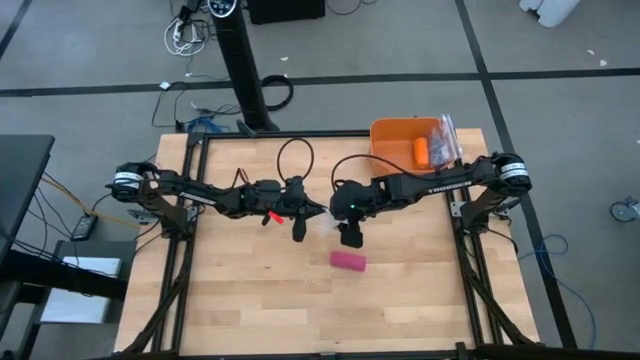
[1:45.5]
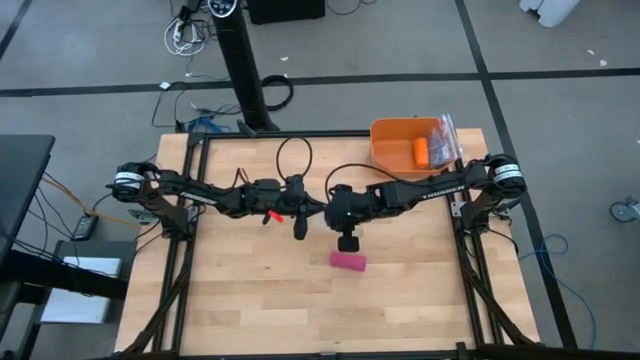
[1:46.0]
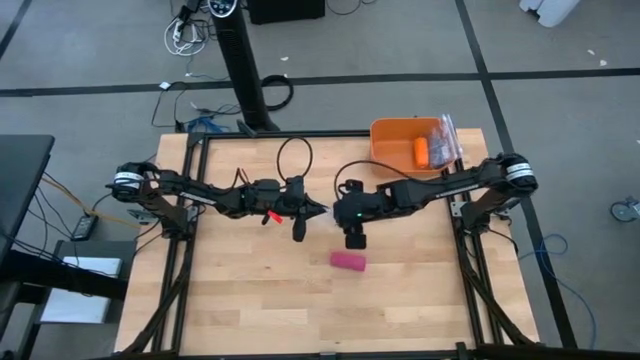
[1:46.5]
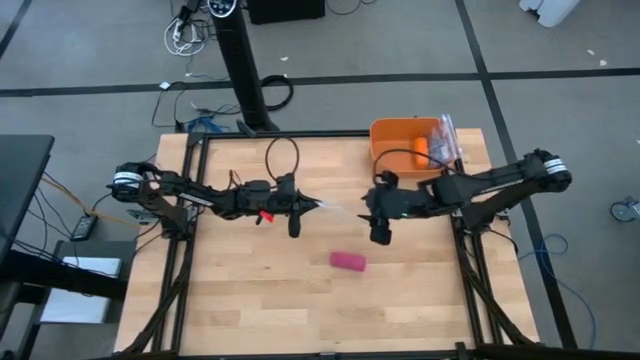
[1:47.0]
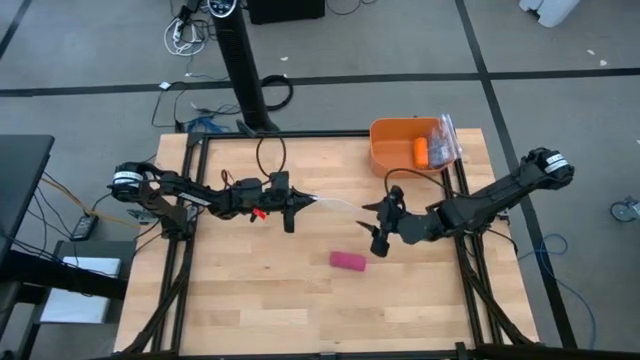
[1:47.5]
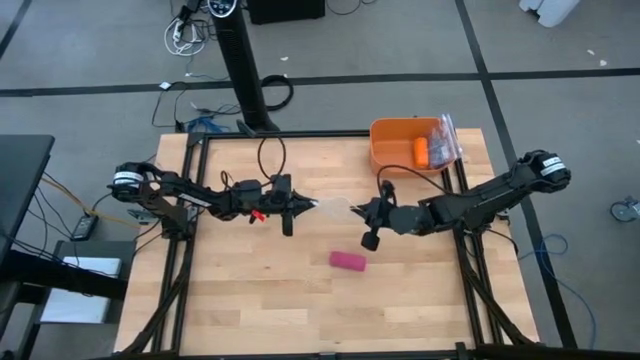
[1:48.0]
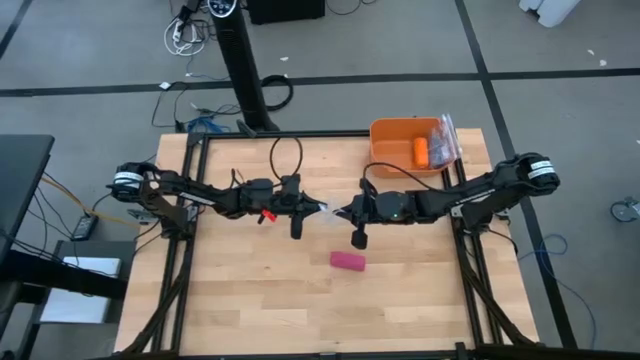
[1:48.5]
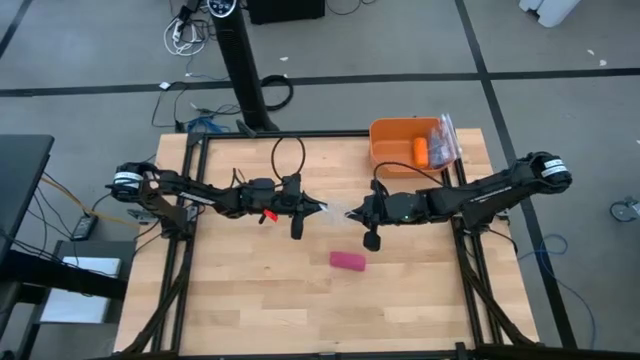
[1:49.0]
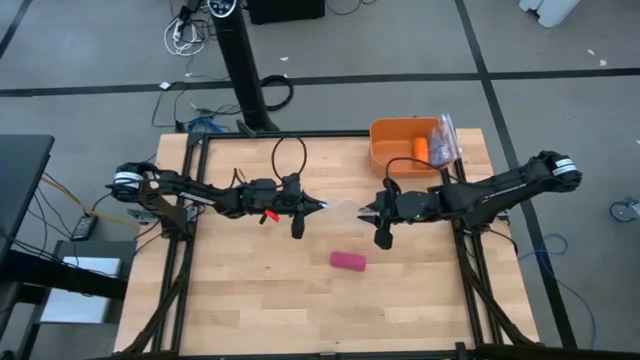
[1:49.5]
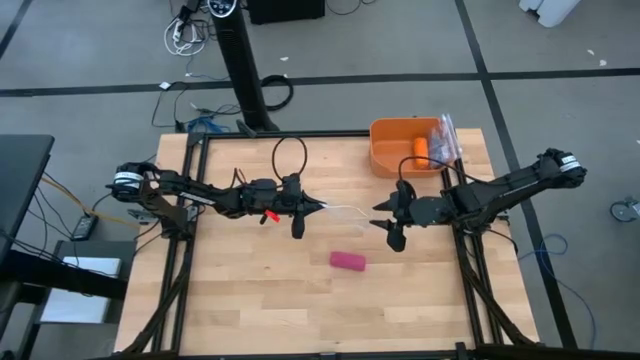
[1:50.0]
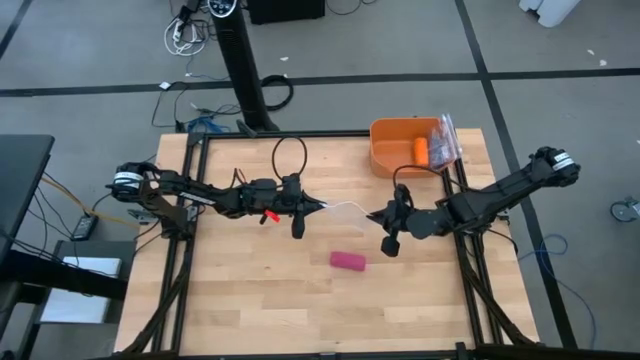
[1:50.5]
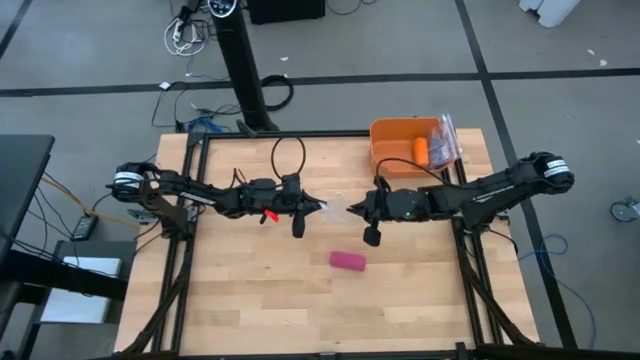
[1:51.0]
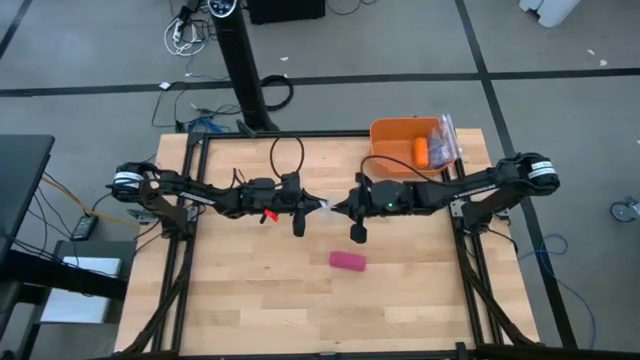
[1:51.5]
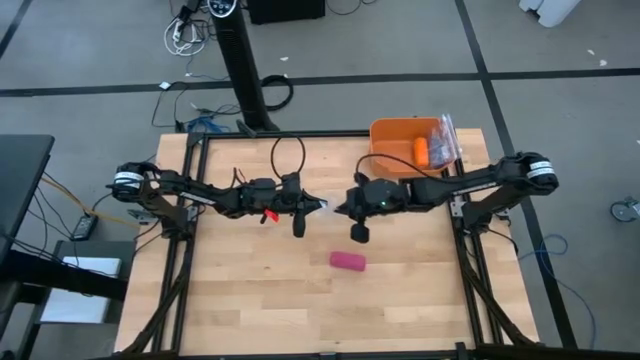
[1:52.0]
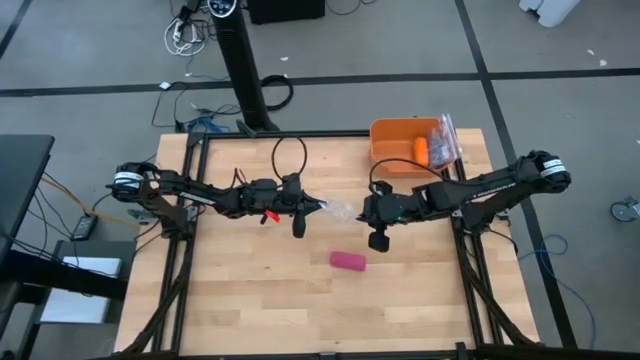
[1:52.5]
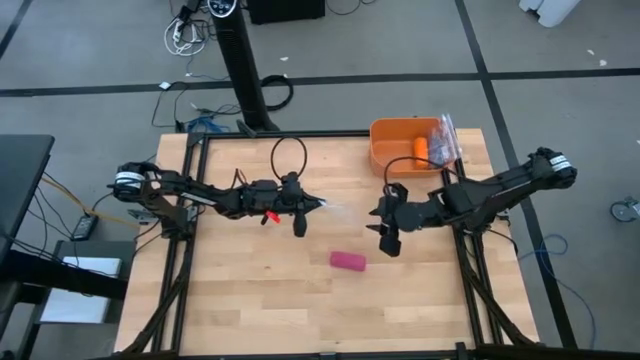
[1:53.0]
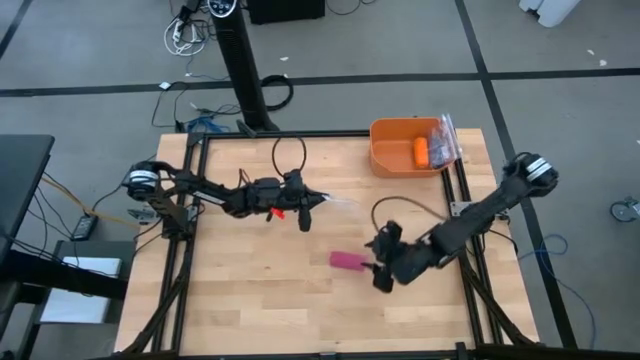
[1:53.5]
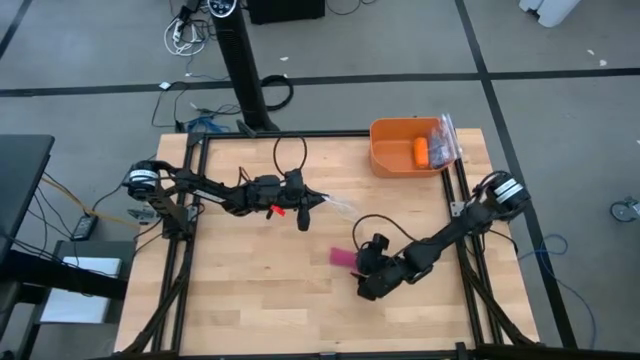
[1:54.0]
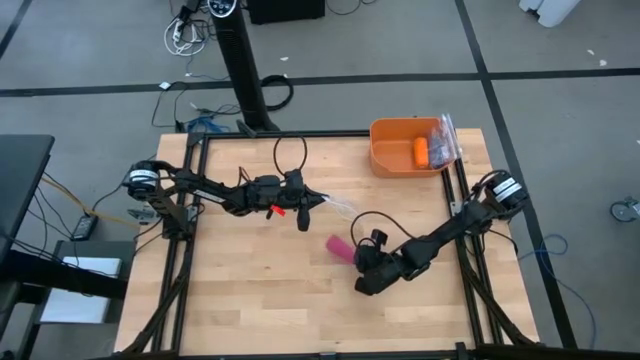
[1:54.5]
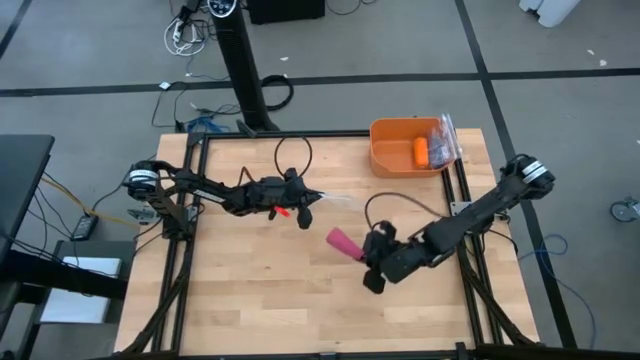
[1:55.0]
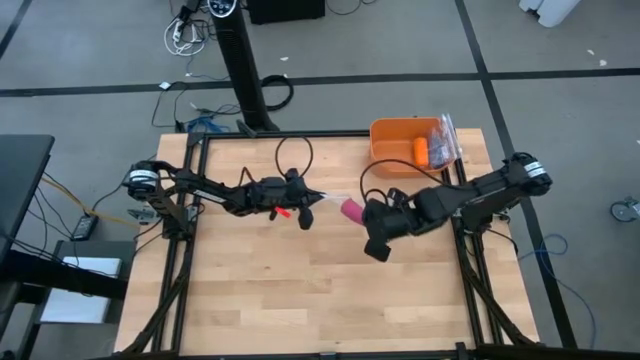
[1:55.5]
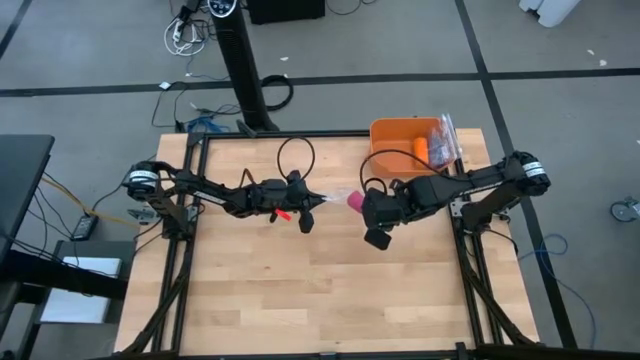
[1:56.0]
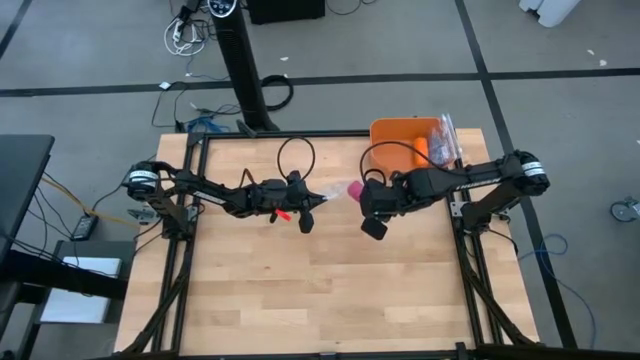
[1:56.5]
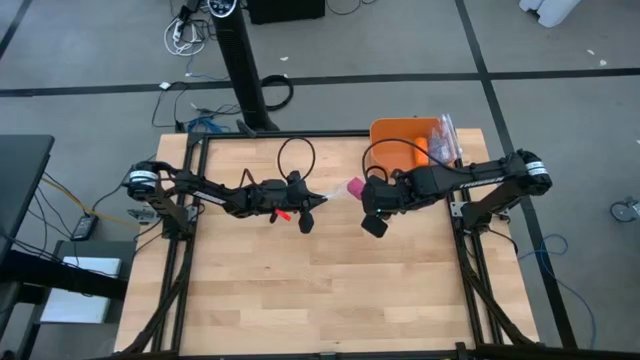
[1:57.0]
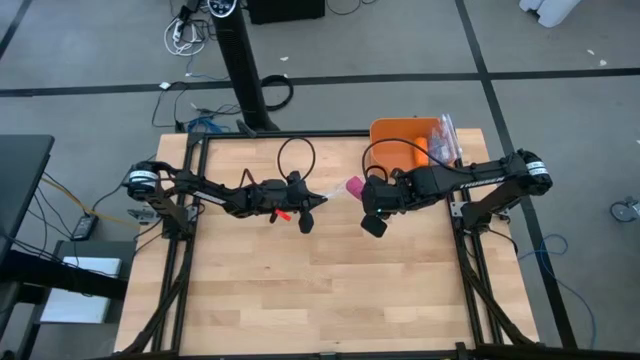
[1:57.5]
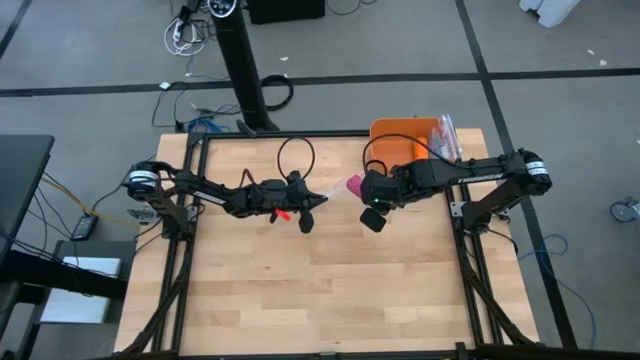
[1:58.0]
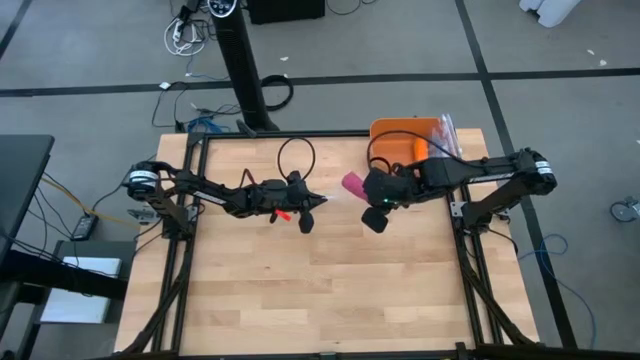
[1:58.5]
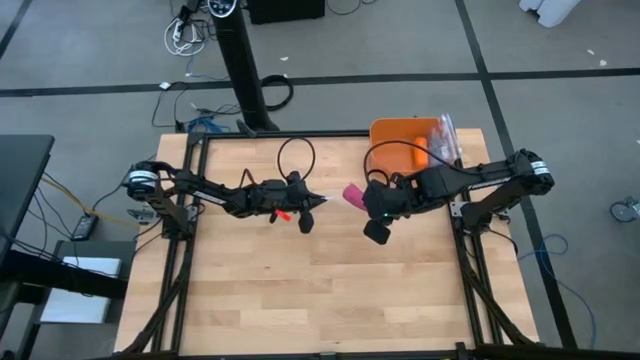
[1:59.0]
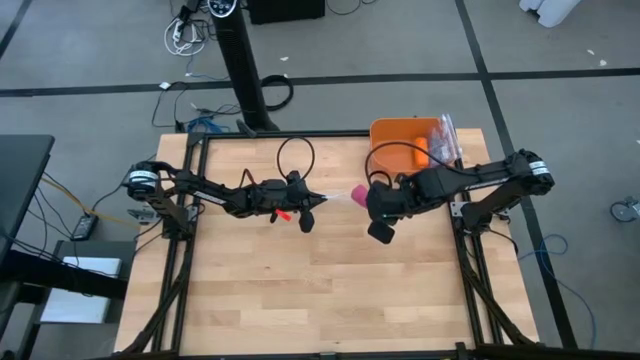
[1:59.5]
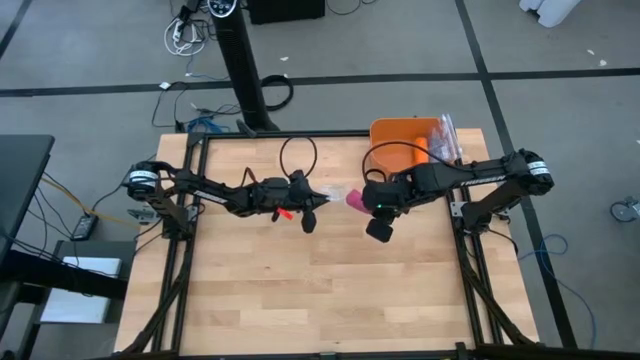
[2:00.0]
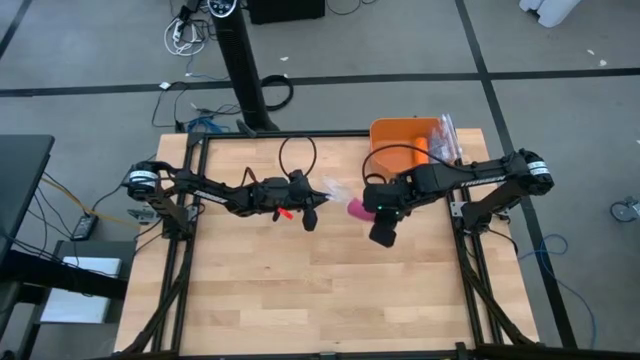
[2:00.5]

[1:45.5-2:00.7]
Task: Roll bandage
Insert the pink bandage into the transparent zip bag

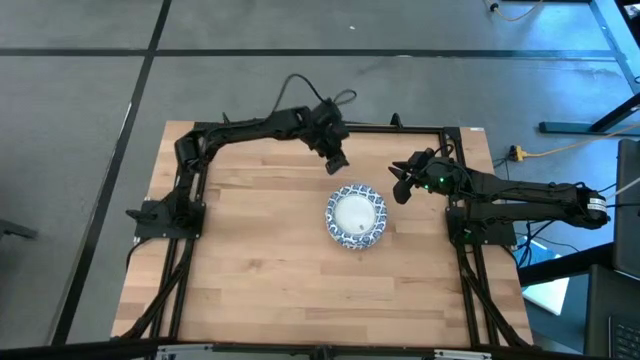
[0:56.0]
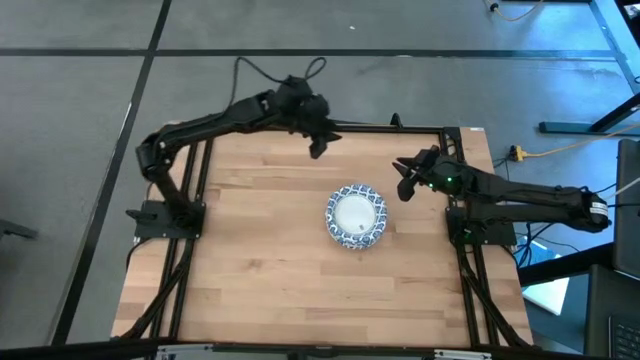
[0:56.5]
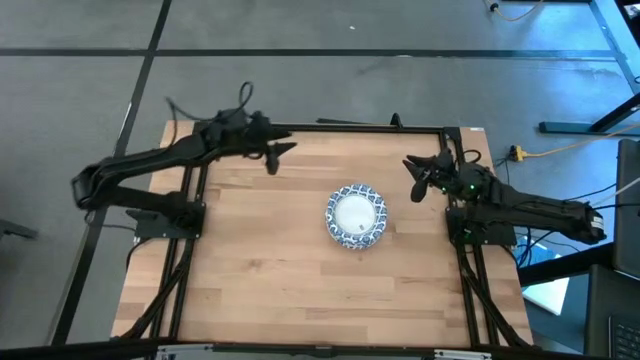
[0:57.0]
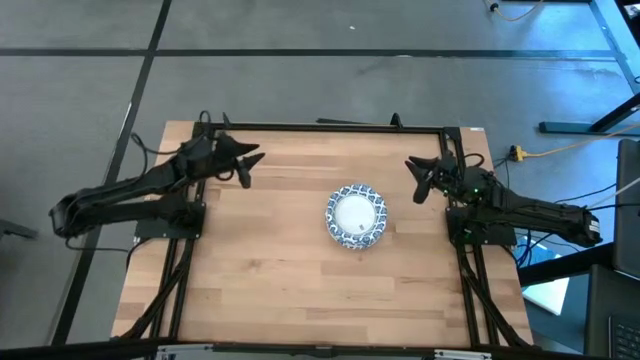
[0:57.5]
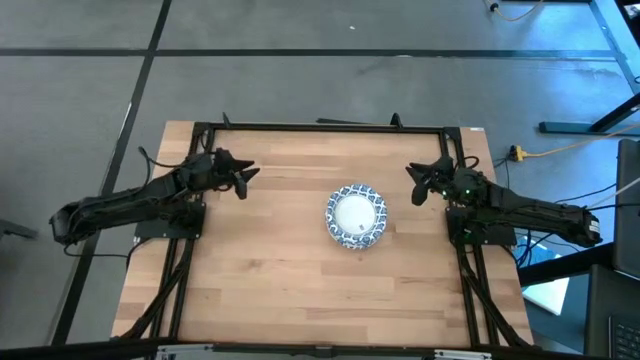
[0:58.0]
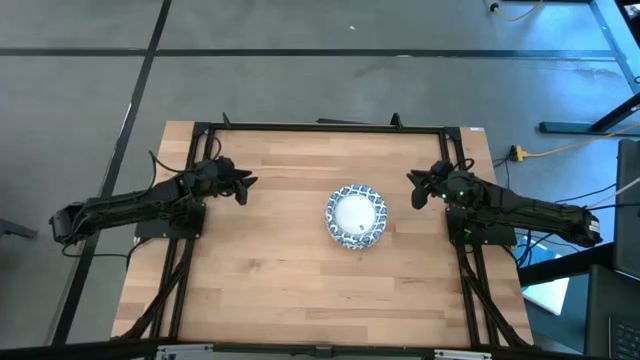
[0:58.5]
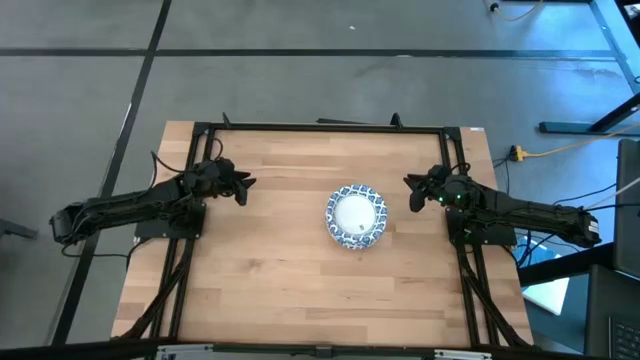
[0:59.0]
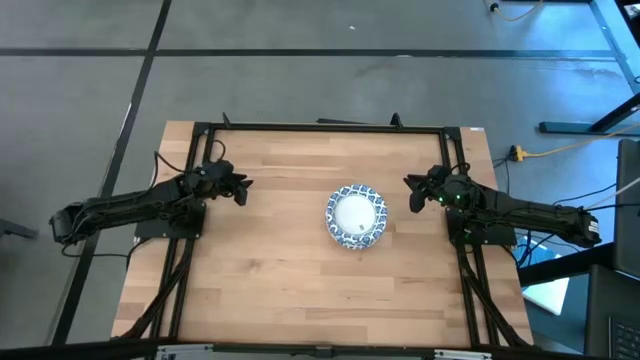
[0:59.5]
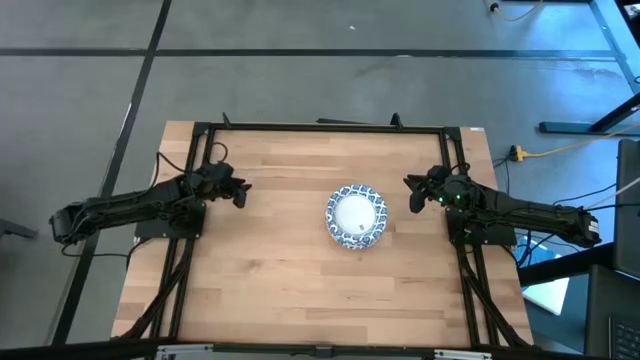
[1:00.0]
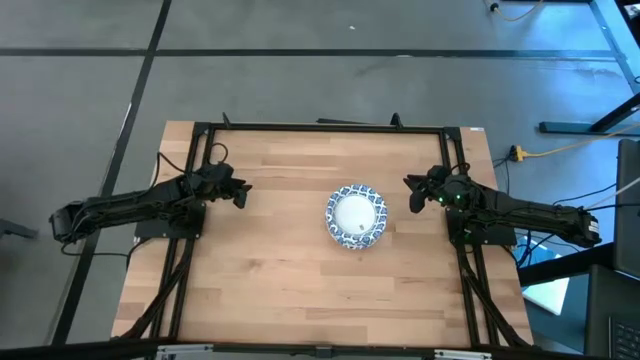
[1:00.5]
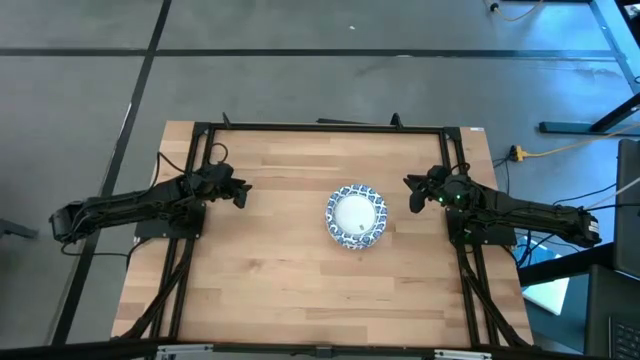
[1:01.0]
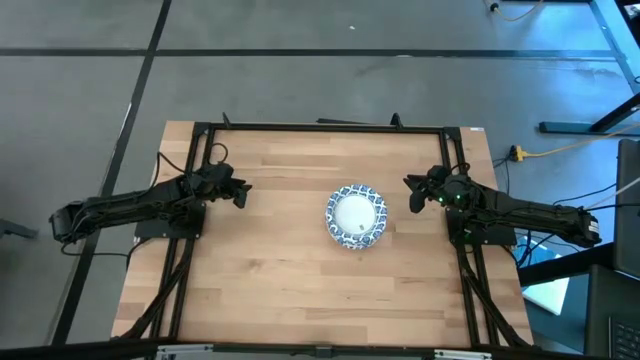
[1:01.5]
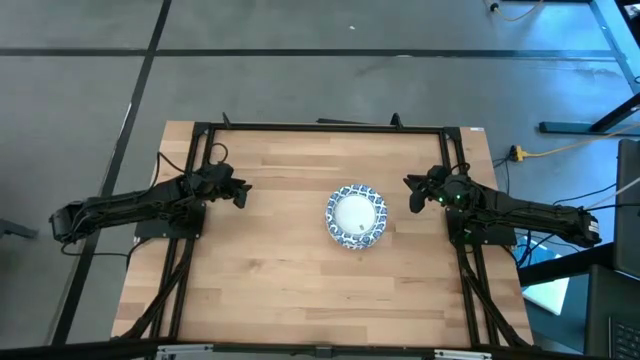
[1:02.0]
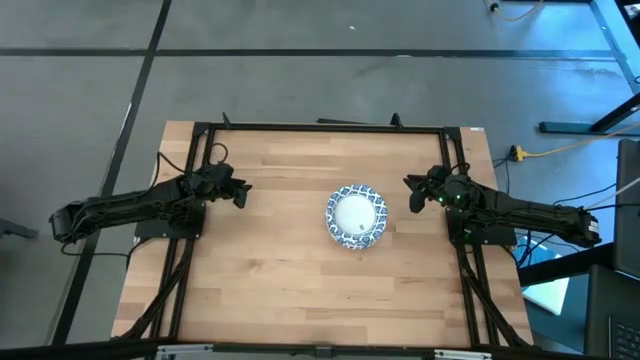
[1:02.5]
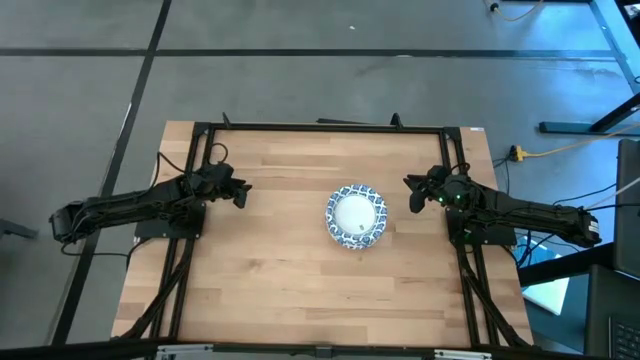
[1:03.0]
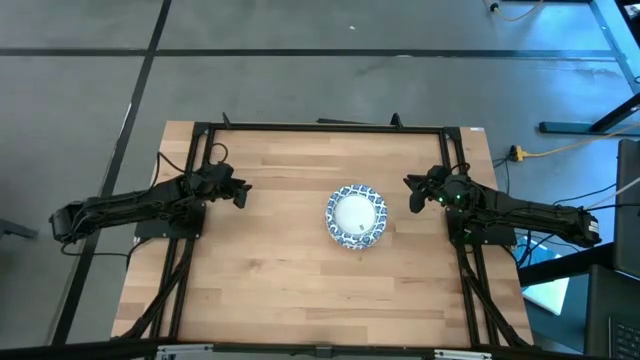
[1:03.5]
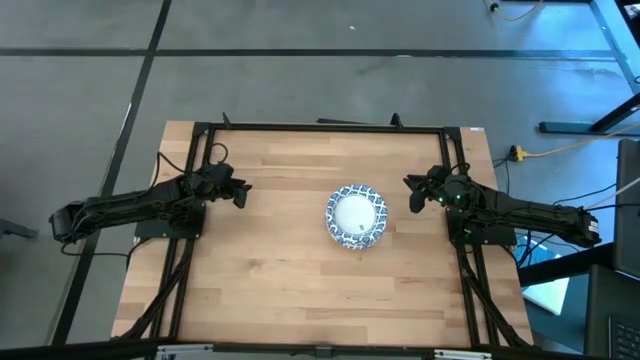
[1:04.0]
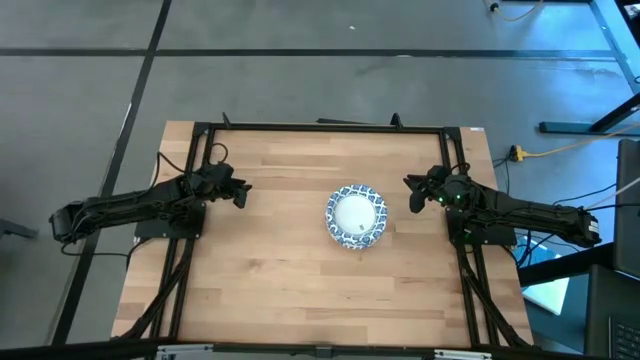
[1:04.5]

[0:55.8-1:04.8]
Task: Nest bowls inside each other
Return to Home Position
